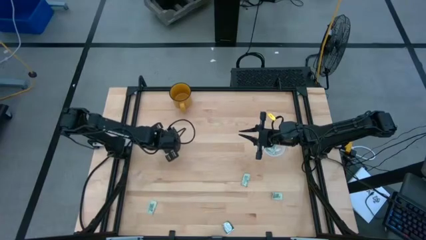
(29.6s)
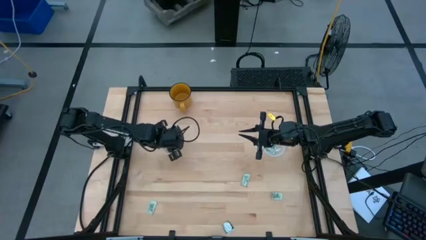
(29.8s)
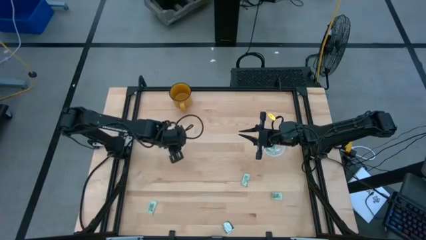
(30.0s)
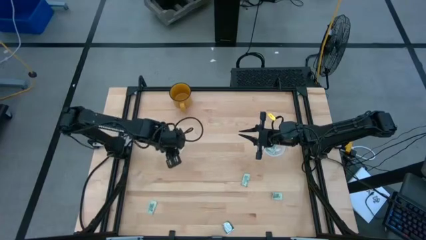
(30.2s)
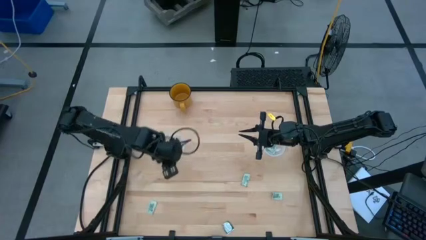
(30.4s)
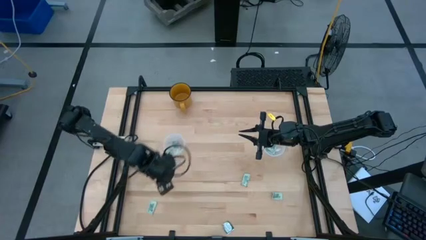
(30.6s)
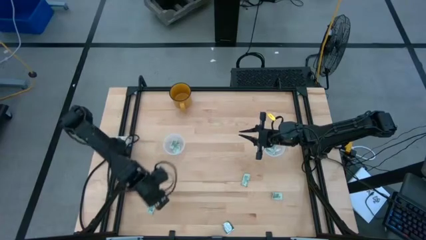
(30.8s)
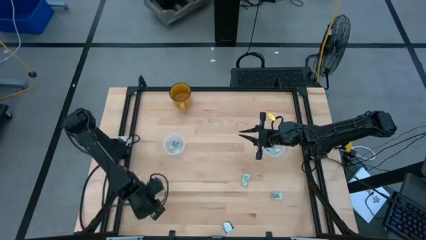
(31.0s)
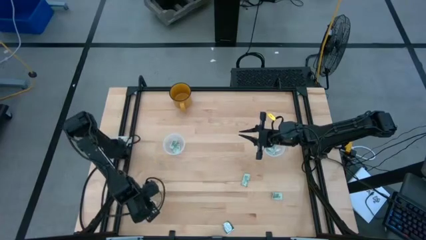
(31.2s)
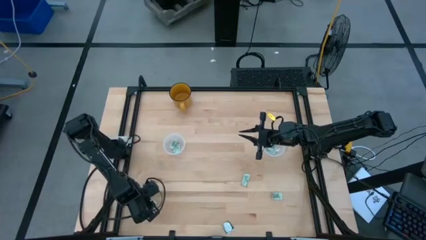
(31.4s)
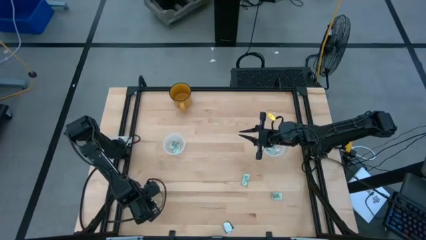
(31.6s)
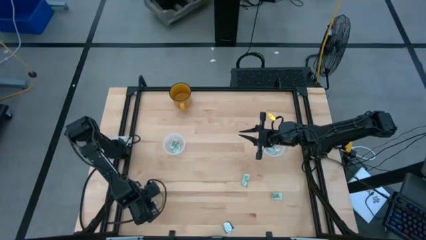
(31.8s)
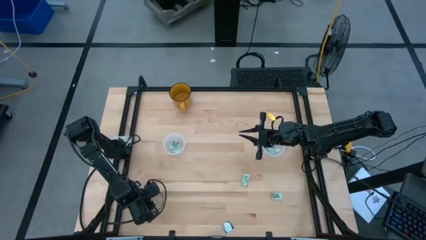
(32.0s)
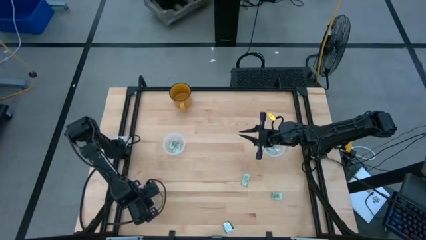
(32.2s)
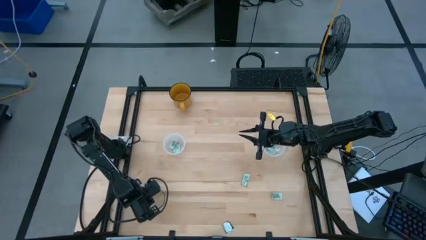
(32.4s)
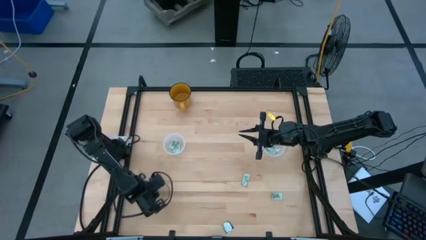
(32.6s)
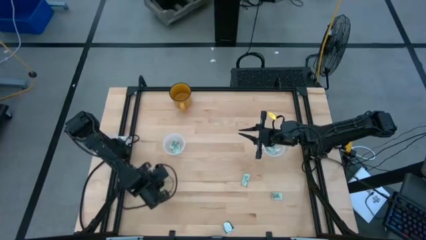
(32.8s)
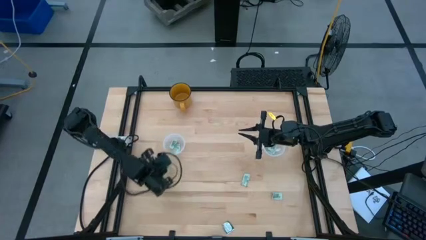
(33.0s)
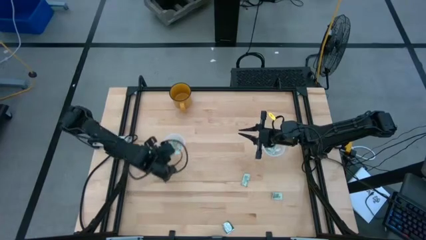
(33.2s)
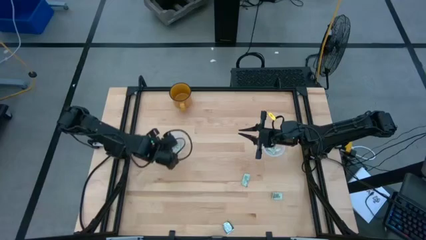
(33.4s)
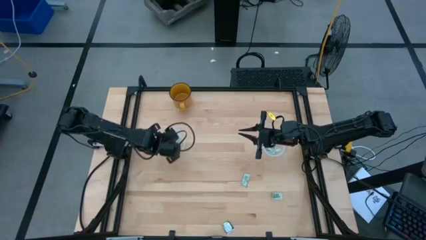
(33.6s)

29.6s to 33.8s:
Task: Pick and place items into bin
Put the stevia packet into the left transparent bin

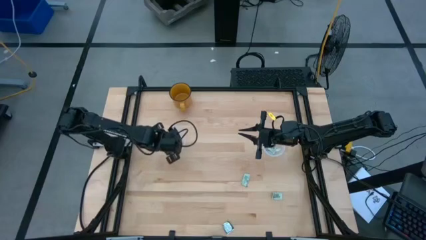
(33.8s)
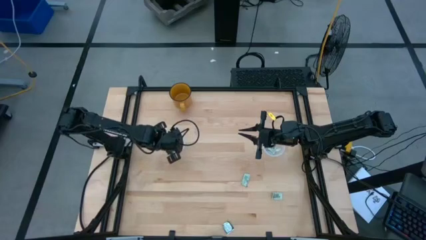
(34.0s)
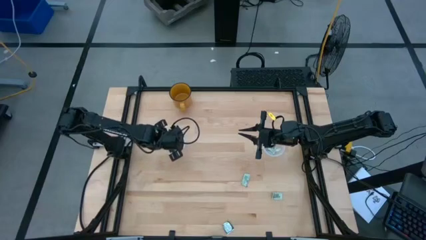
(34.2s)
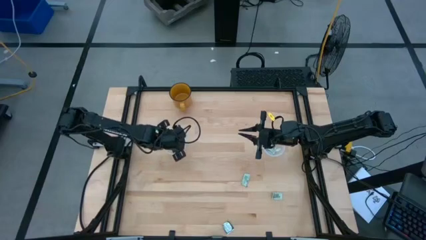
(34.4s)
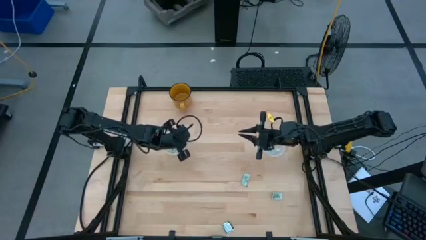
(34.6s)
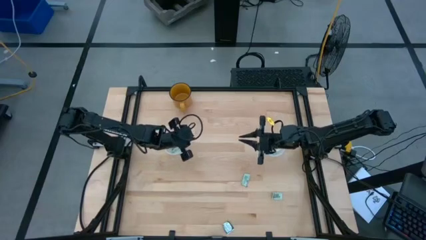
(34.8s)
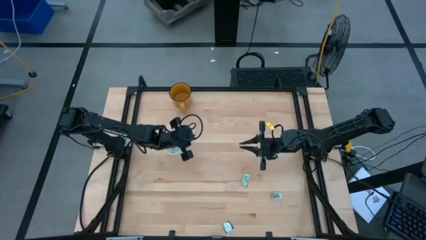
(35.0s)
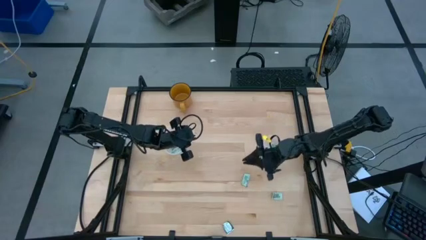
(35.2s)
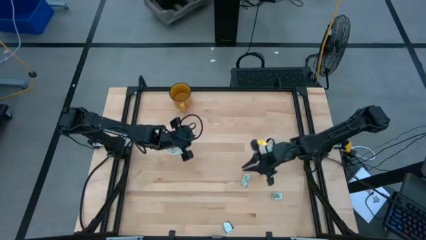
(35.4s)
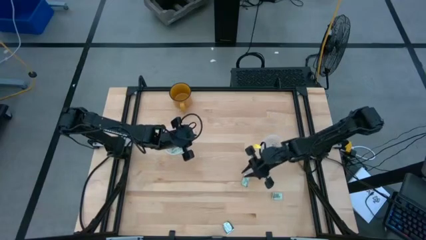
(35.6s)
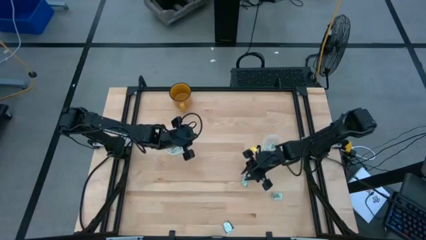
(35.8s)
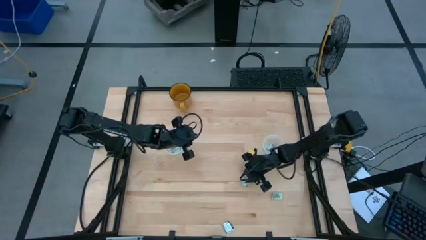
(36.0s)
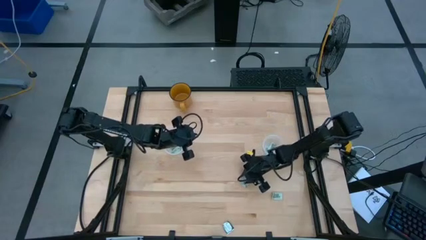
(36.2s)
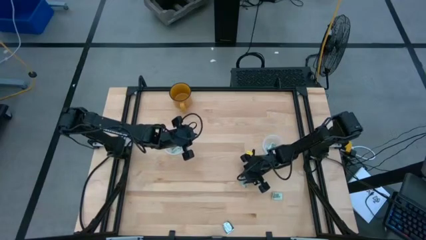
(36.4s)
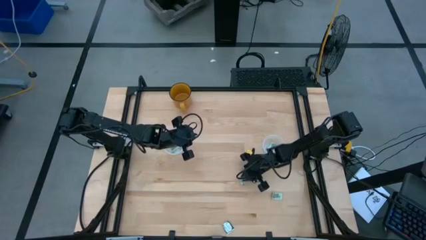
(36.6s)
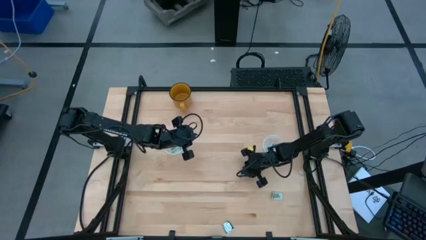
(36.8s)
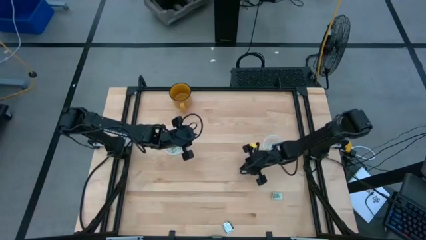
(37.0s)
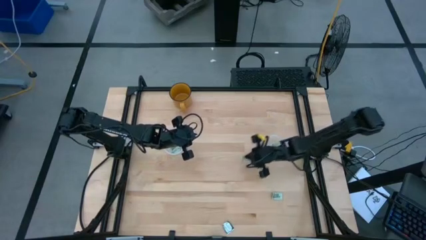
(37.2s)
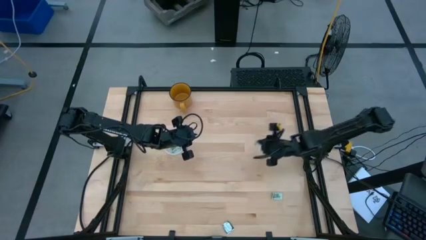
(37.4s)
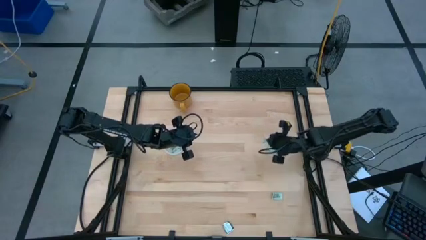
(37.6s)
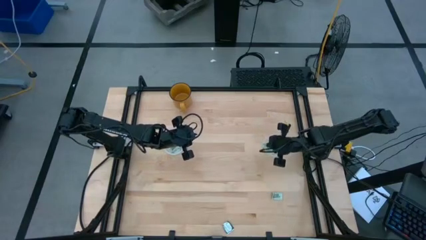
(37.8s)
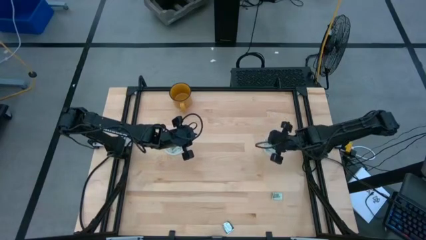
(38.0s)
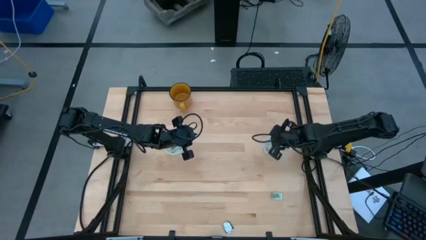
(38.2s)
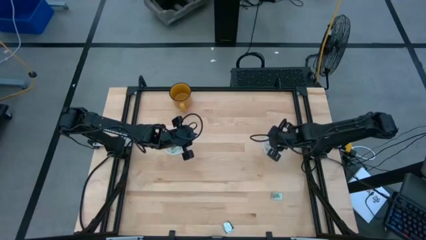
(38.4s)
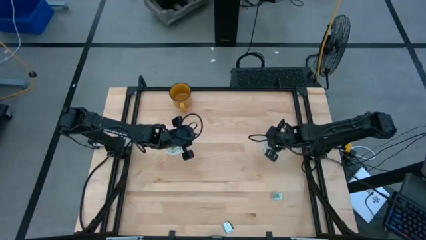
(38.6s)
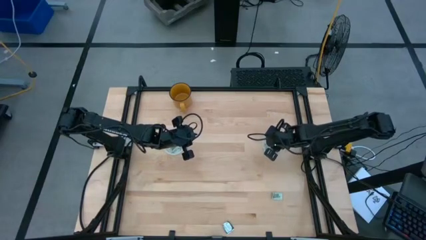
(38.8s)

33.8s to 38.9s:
Put the stevia packet into the right transparent bin

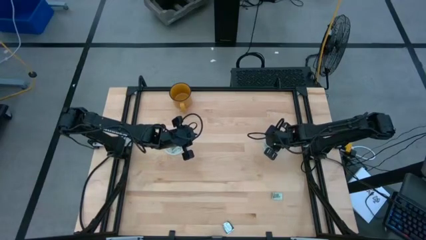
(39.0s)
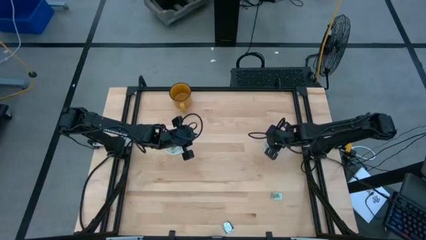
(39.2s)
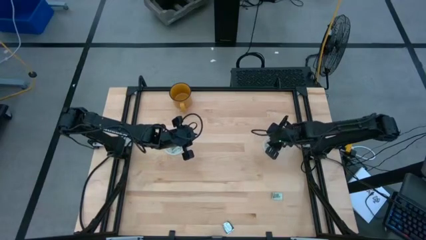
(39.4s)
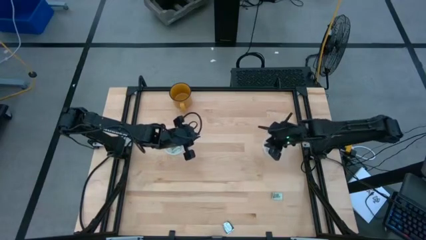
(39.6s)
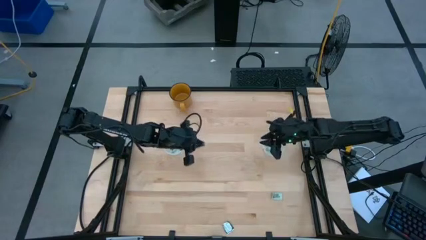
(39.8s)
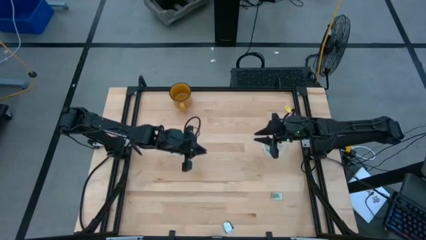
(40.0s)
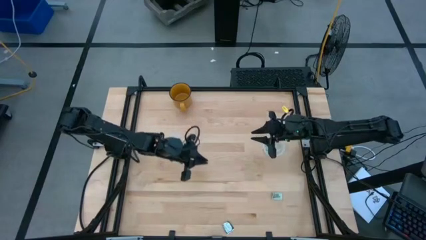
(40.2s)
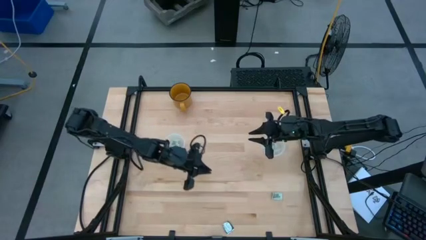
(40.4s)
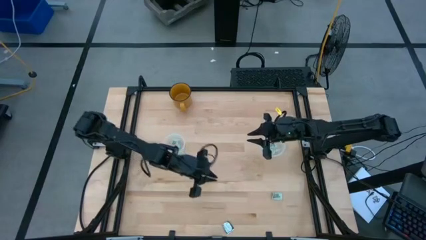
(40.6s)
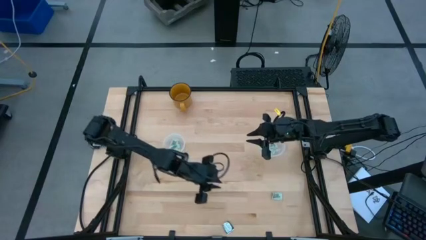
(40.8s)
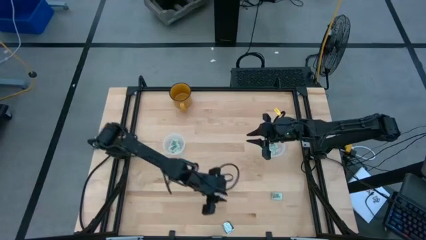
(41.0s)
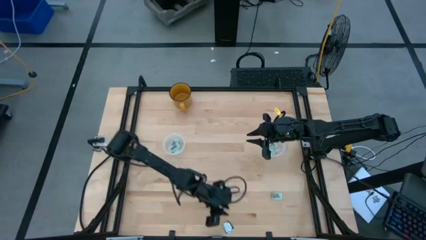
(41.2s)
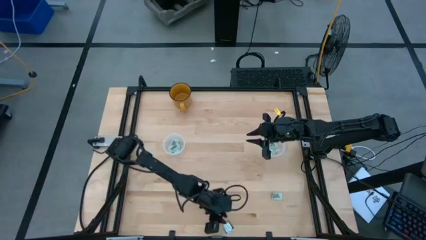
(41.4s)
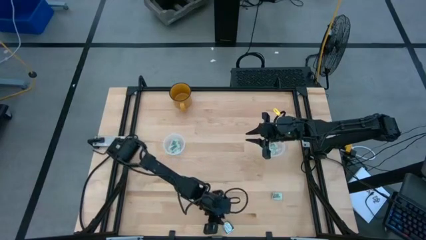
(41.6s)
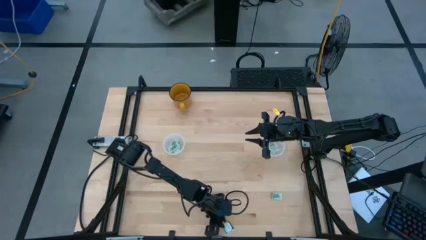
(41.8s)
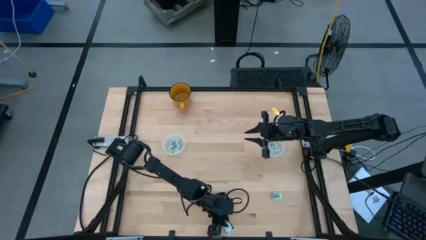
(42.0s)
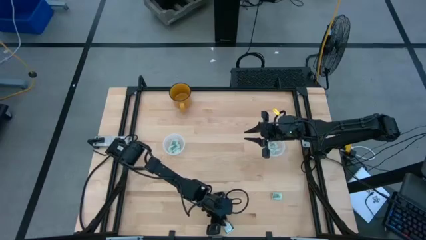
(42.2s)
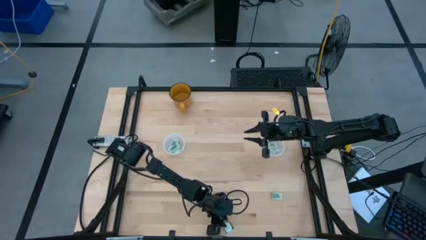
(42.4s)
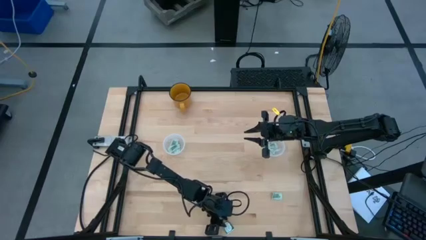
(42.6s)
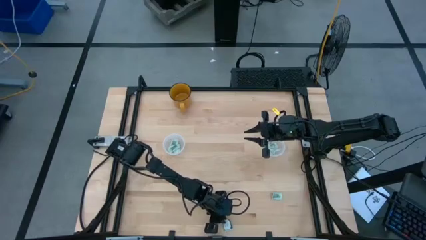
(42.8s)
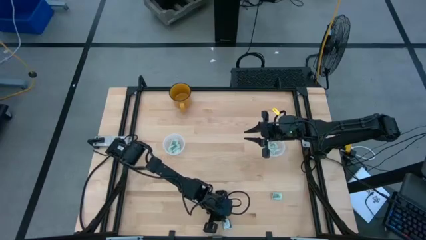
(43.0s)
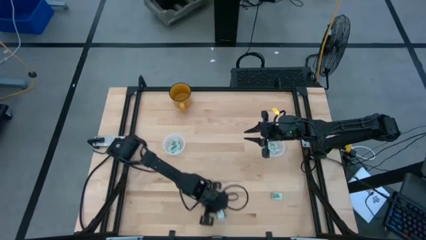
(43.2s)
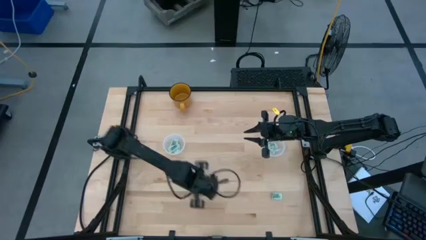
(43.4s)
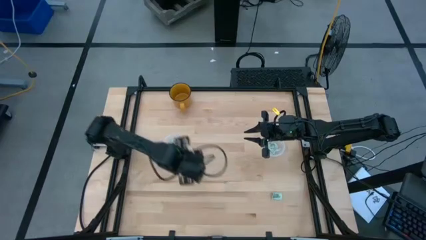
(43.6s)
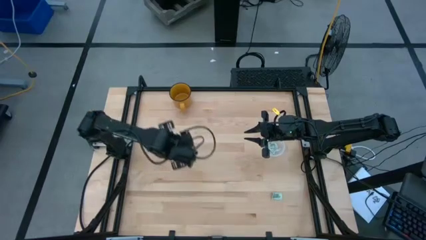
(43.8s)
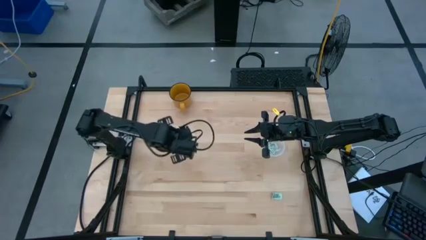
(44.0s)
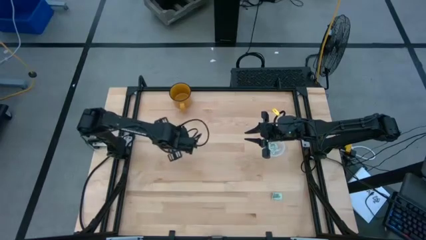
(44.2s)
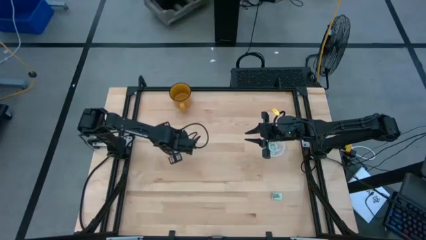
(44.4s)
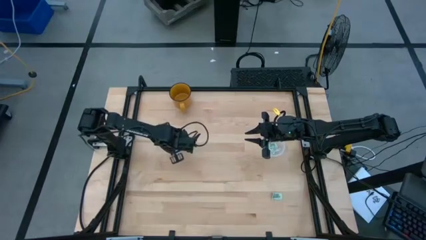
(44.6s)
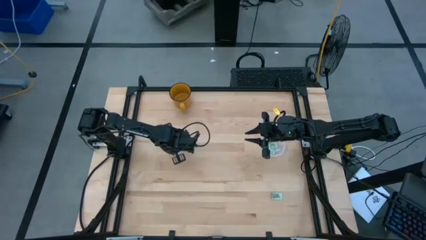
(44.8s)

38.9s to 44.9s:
Put the truvia packet into the left transparent bin
